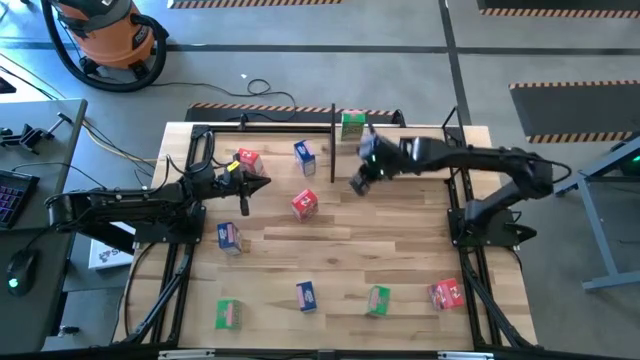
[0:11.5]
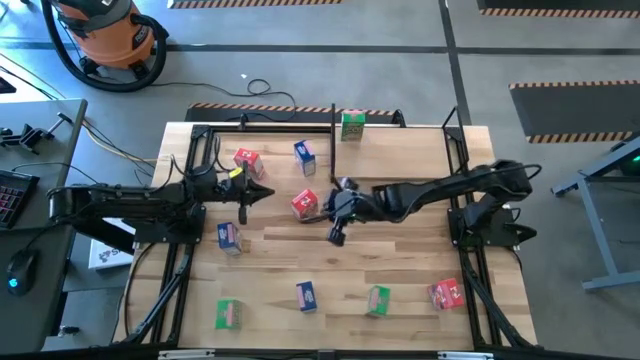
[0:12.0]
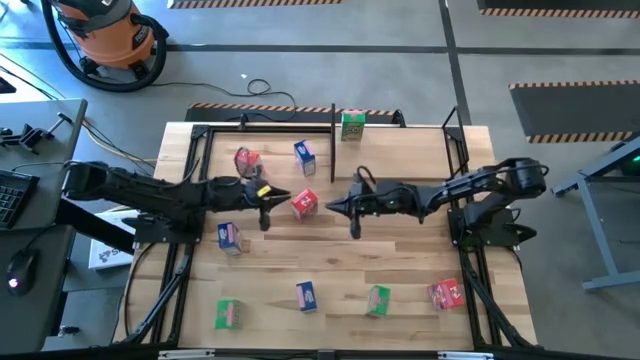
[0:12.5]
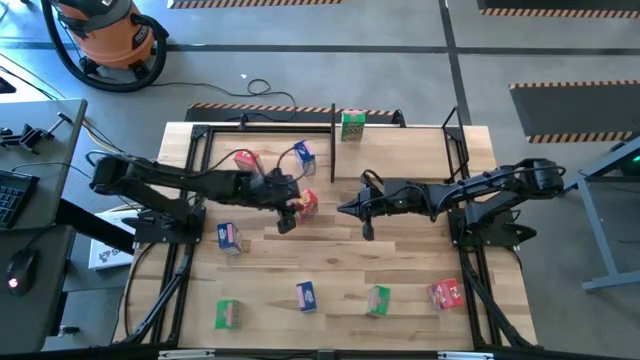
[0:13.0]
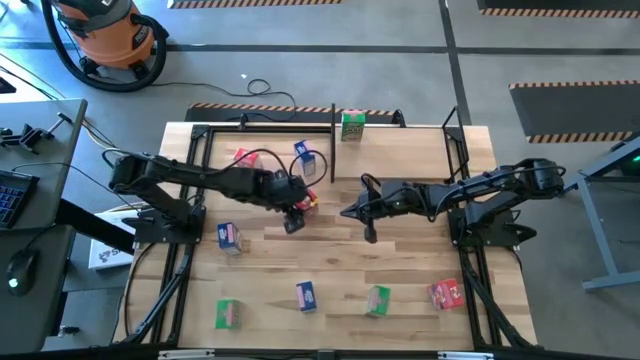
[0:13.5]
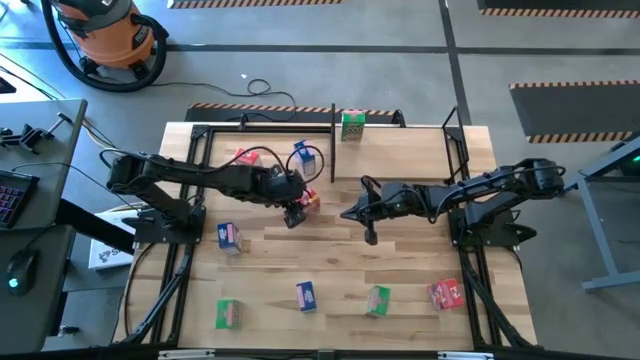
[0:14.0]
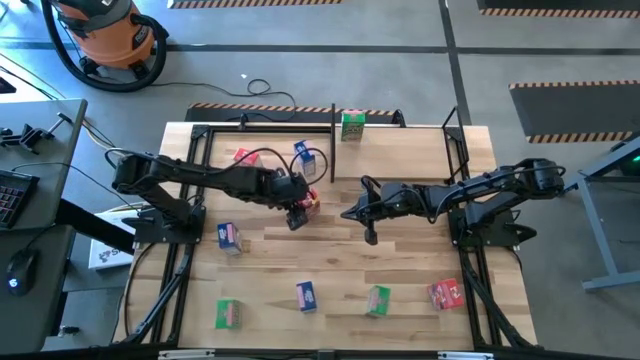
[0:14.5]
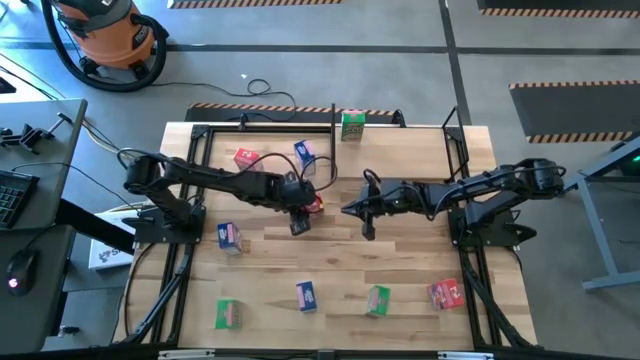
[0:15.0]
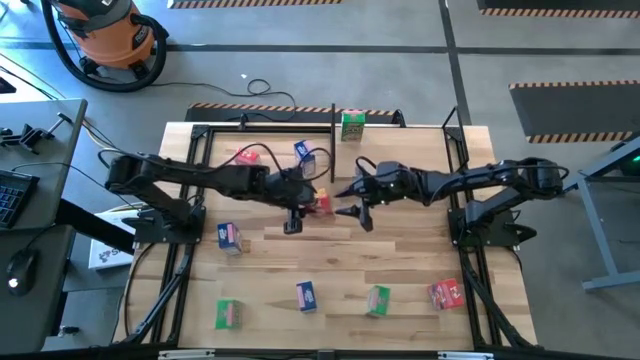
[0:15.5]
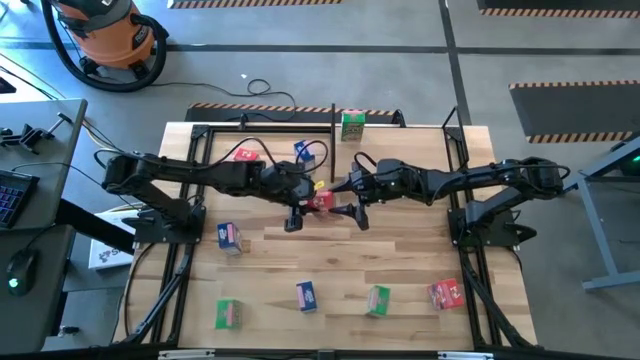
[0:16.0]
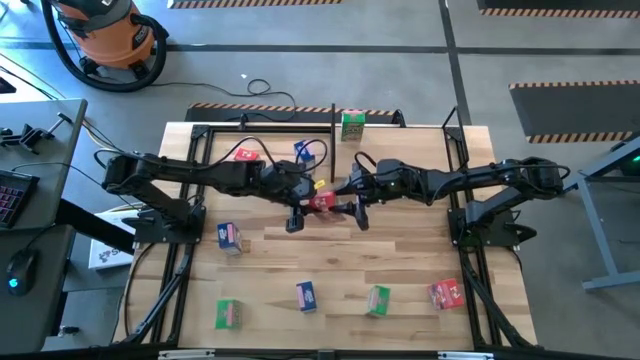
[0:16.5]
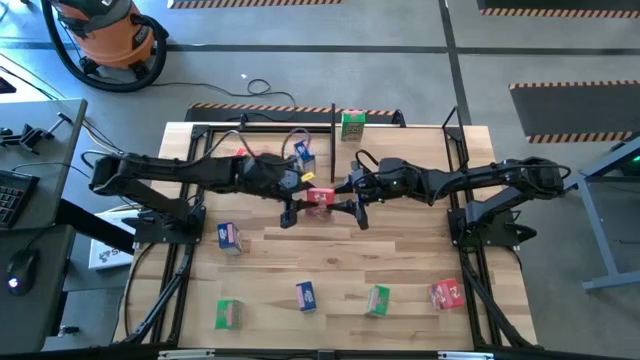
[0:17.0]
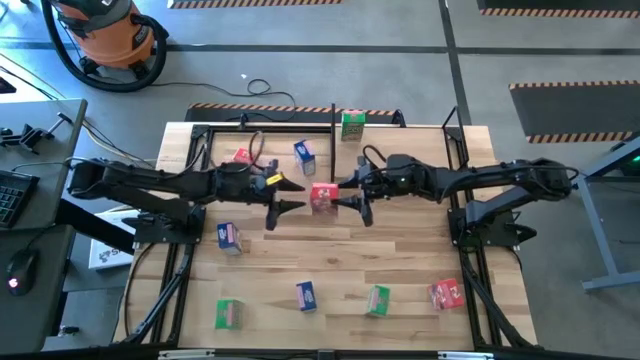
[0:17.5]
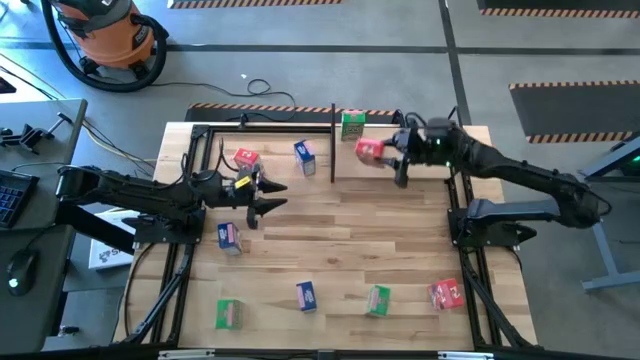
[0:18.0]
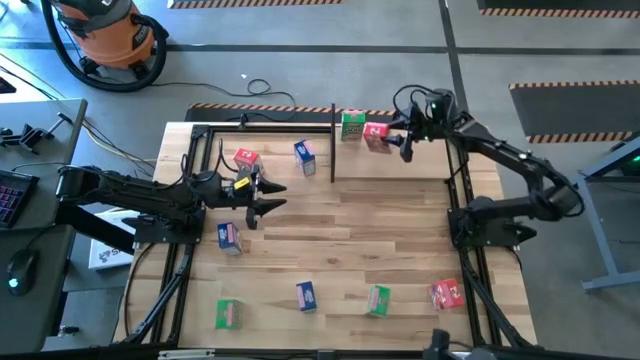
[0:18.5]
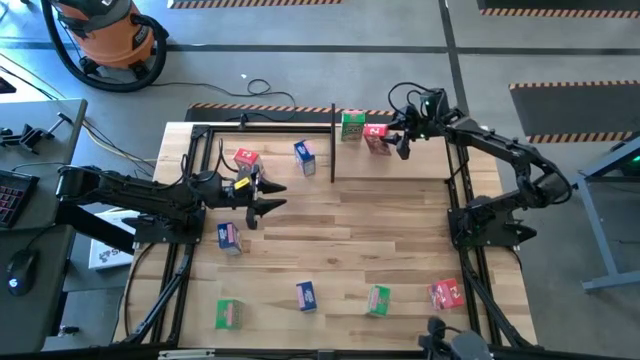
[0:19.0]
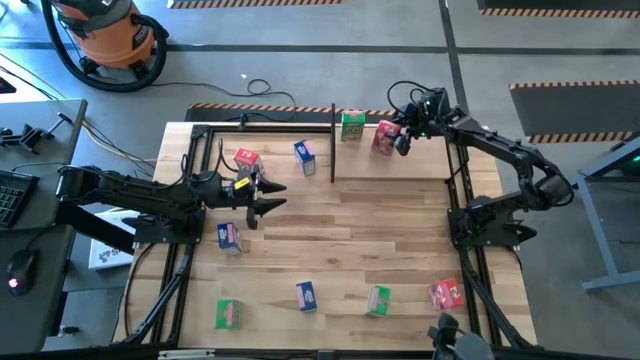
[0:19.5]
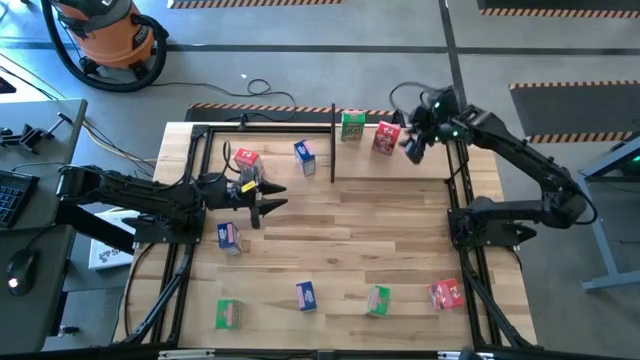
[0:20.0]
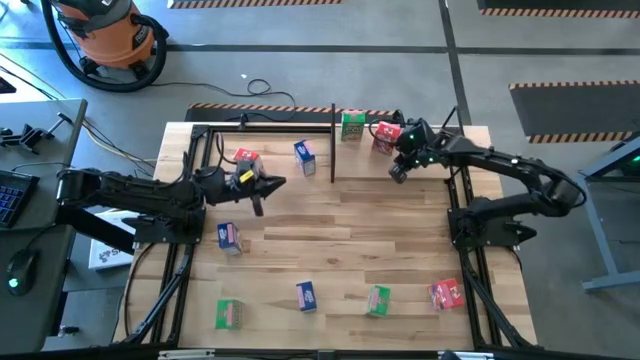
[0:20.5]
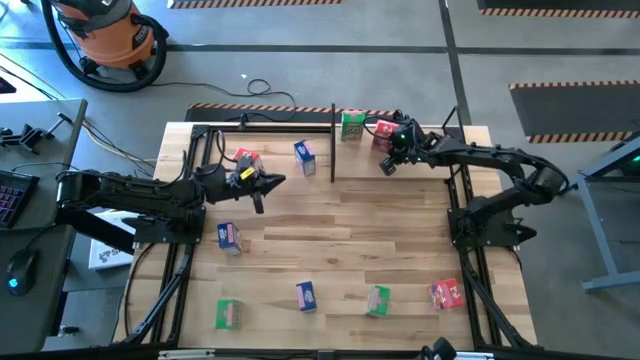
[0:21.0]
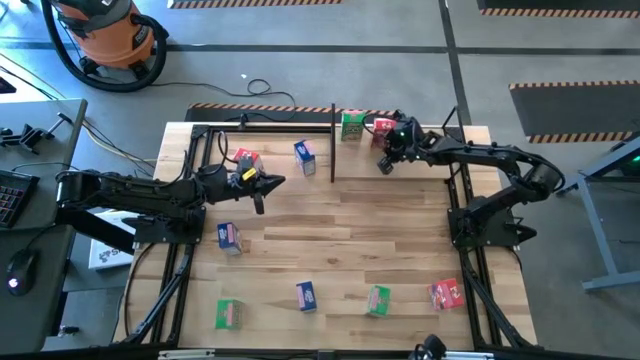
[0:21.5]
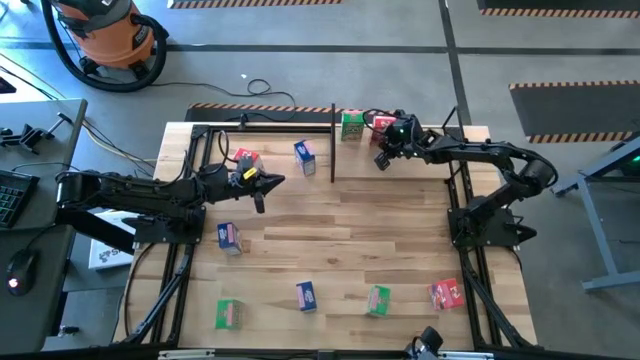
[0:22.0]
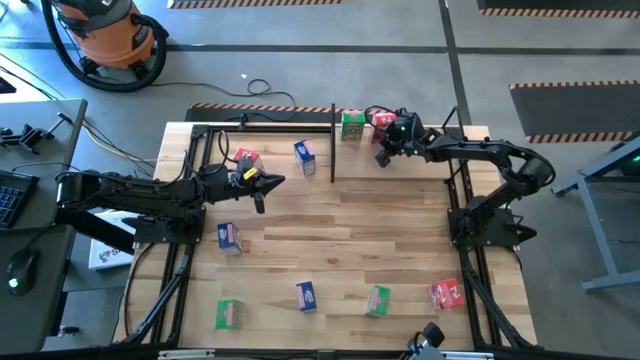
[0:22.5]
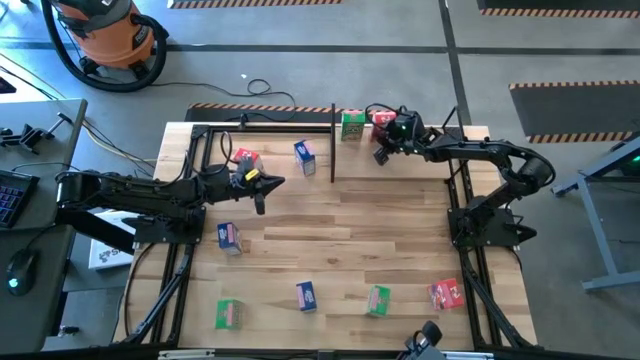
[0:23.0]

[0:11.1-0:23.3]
Task: Stack cereal on shelf
Put the center red cereal box on the shelf

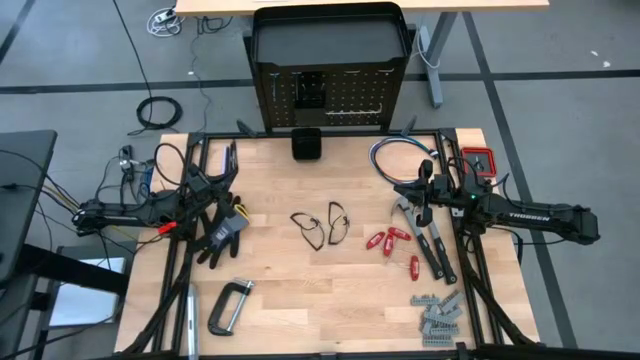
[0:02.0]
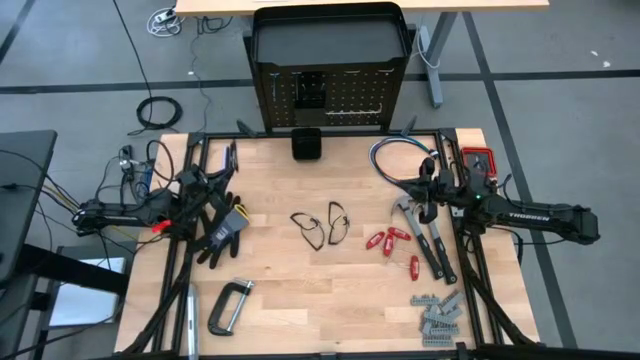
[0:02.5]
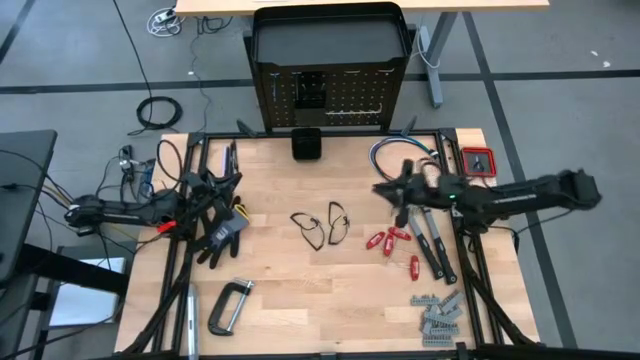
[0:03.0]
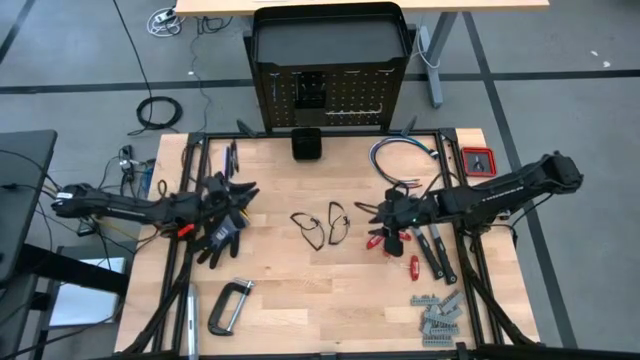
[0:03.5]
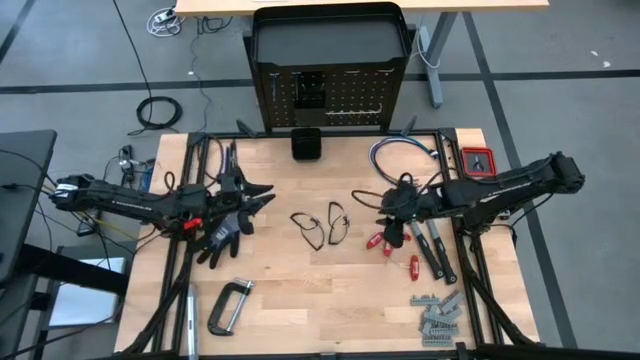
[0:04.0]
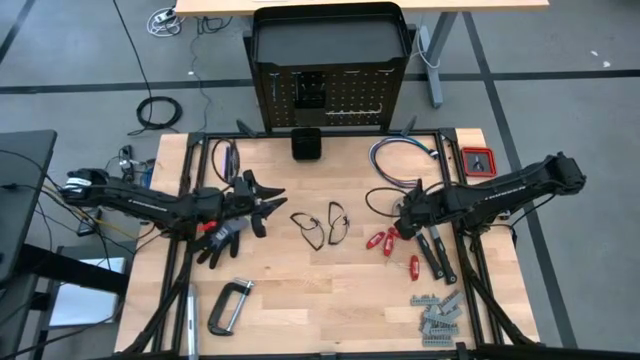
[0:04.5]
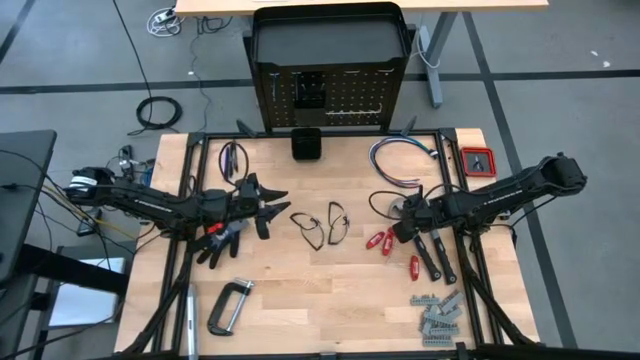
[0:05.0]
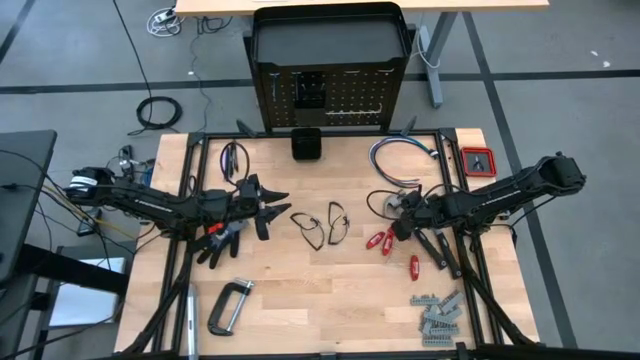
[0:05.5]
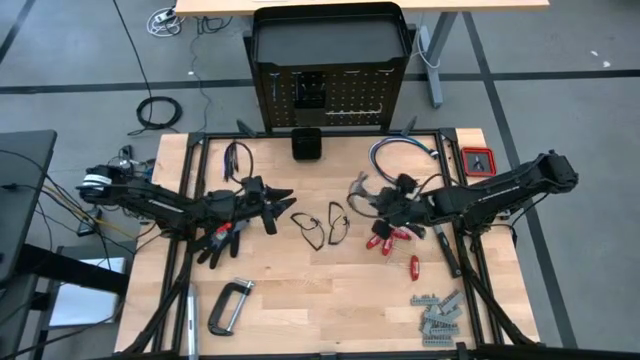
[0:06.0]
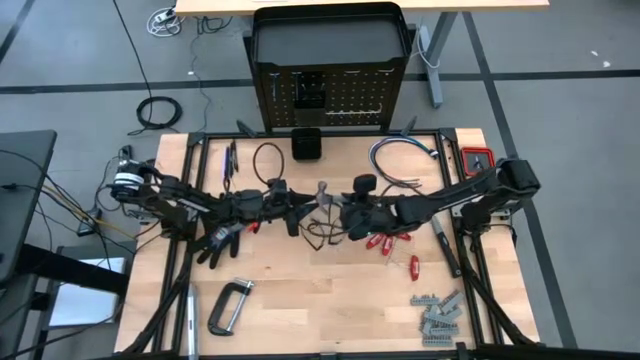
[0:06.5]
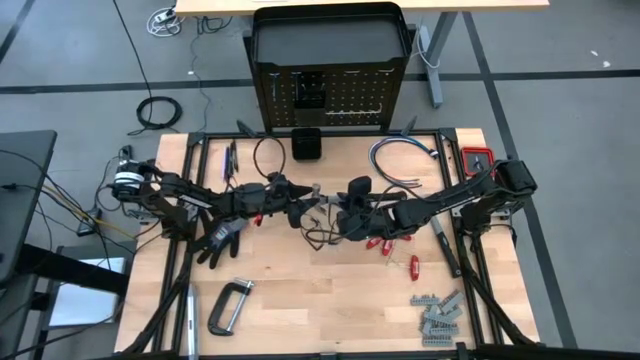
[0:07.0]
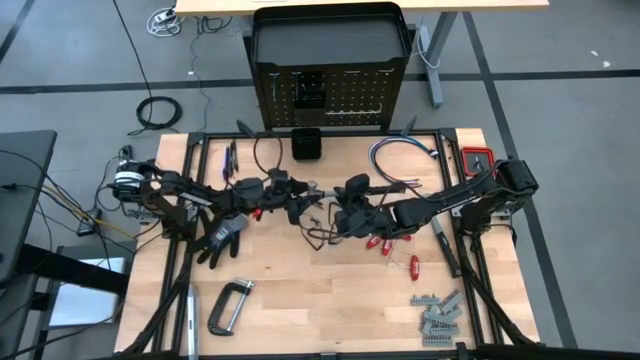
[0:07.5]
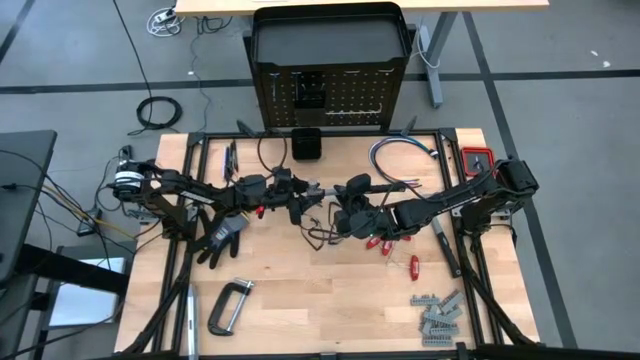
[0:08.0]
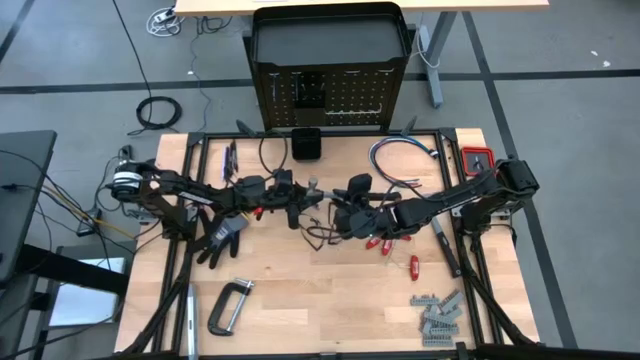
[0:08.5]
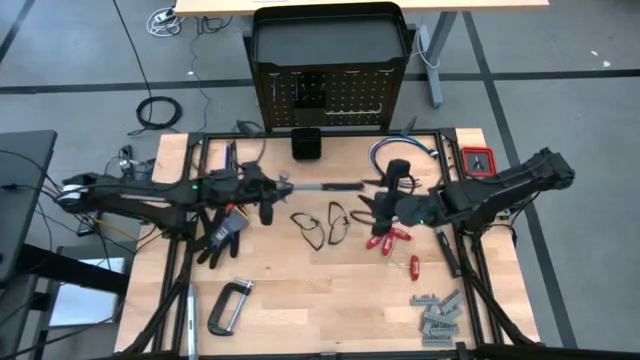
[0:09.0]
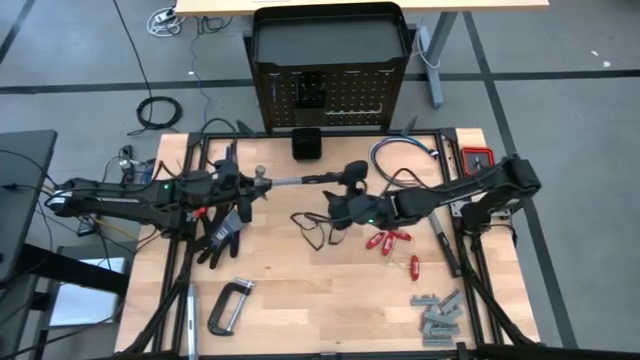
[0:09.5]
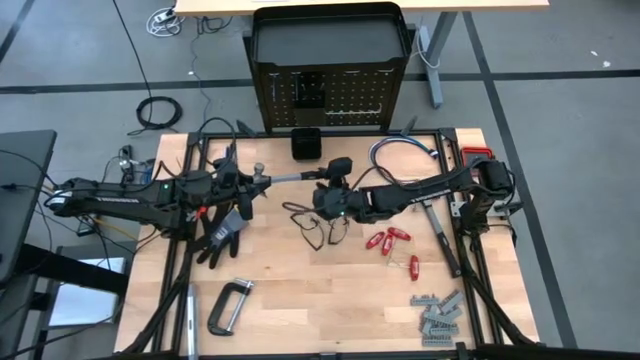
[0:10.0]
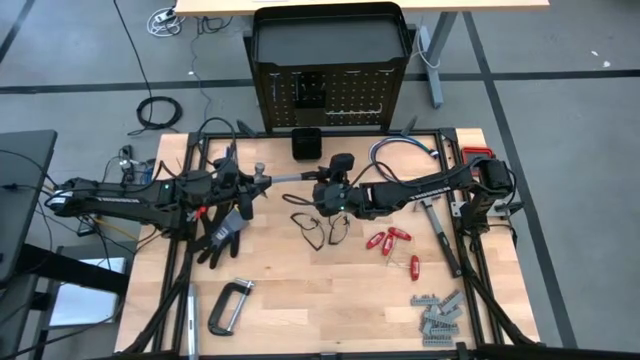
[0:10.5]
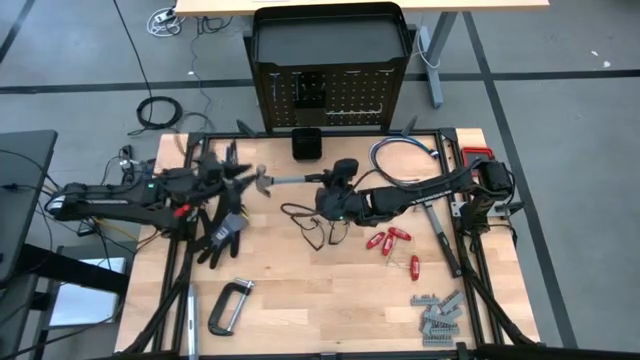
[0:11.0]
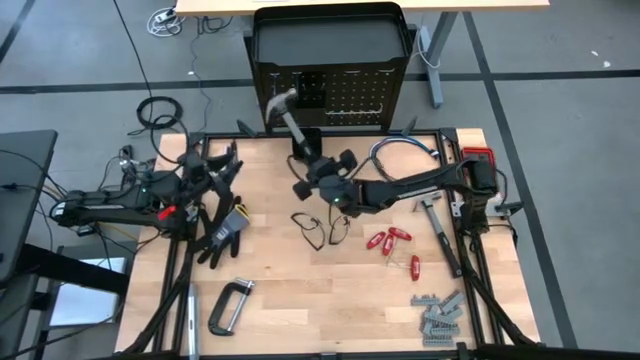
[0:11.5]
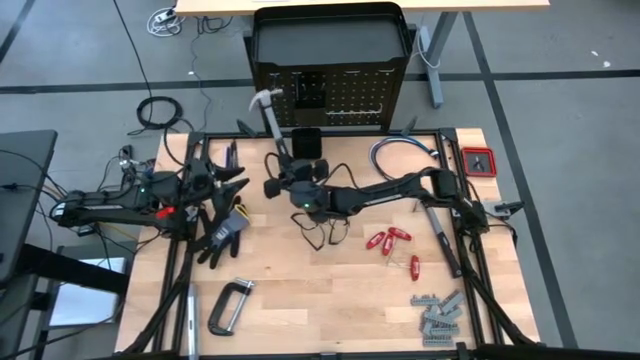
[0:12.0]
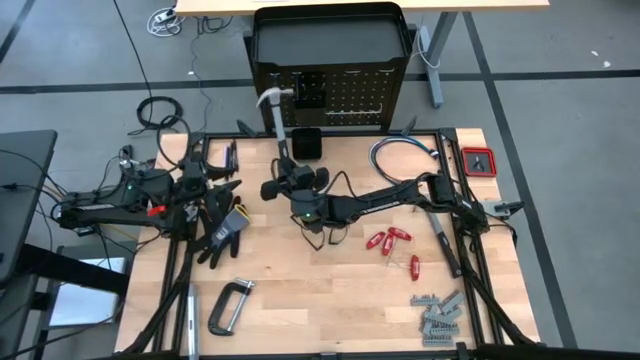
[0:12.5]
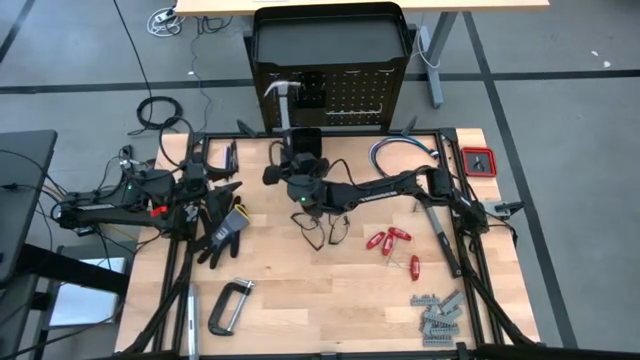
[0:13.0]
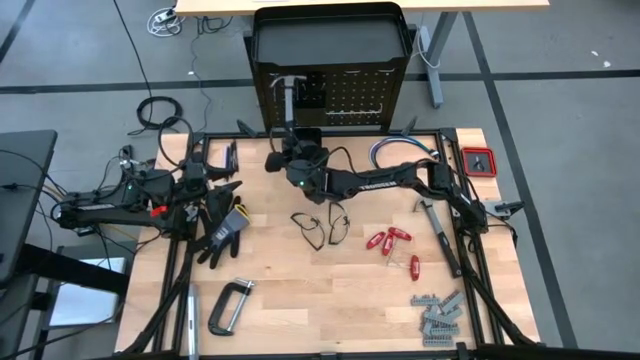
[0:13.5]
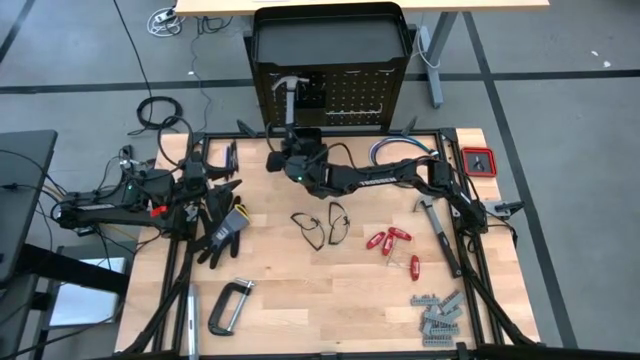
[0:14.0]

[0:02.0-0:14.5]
Task: Hang tools onto peg board
Hang the gray hammer on the peg board
